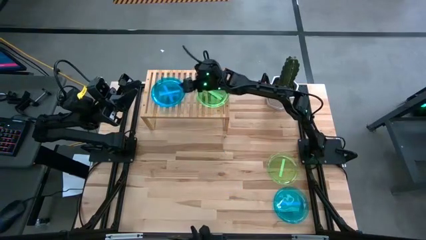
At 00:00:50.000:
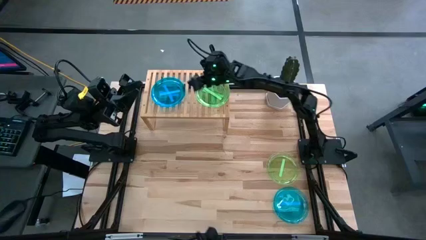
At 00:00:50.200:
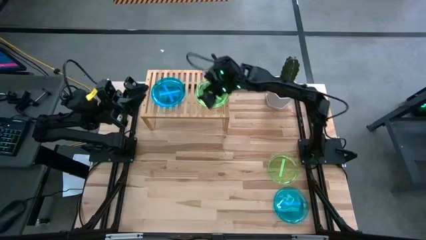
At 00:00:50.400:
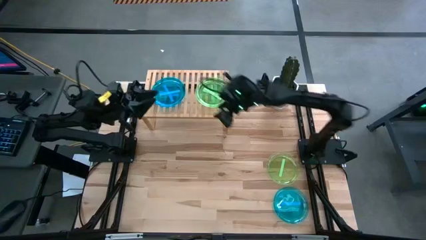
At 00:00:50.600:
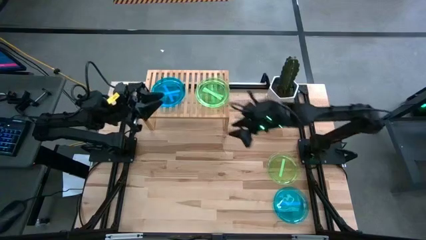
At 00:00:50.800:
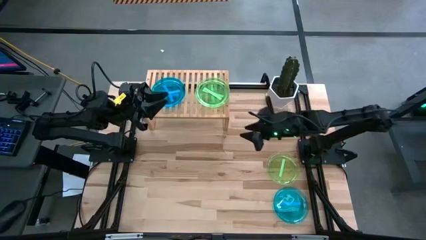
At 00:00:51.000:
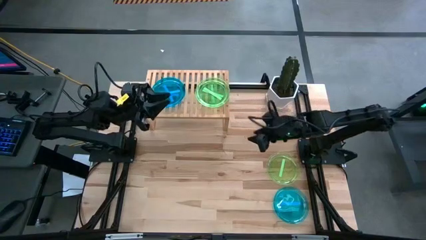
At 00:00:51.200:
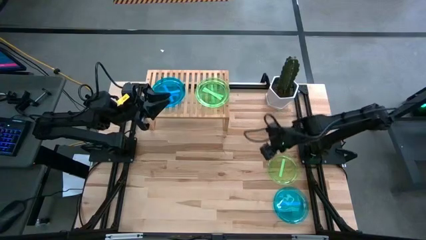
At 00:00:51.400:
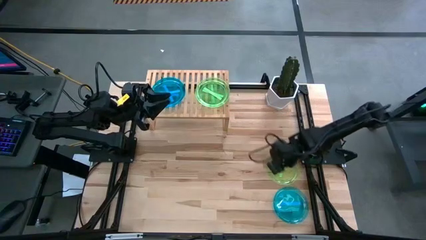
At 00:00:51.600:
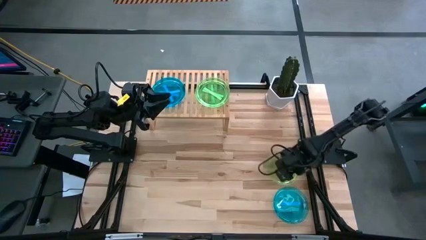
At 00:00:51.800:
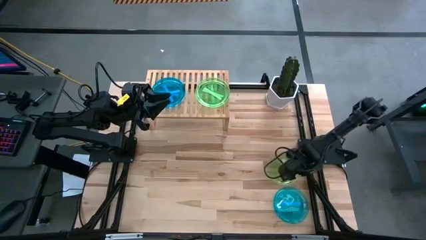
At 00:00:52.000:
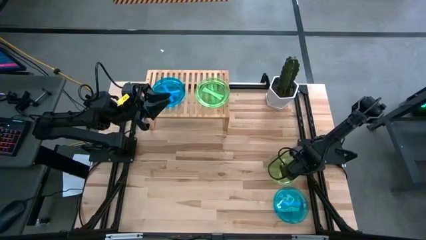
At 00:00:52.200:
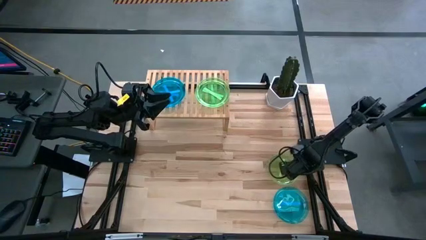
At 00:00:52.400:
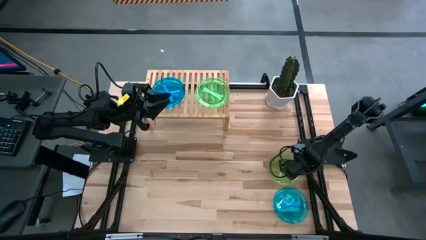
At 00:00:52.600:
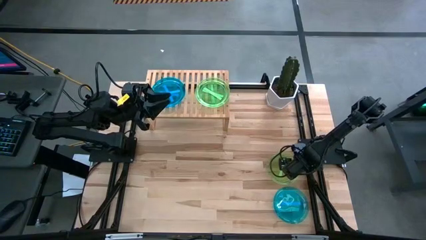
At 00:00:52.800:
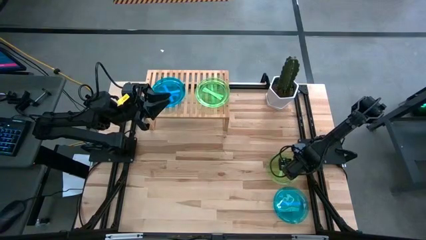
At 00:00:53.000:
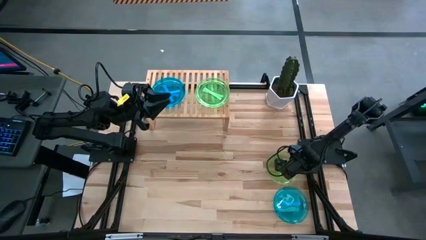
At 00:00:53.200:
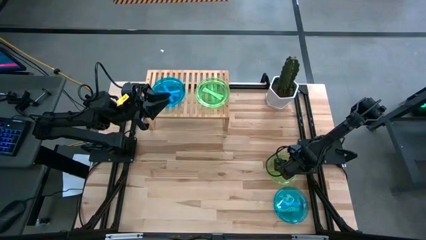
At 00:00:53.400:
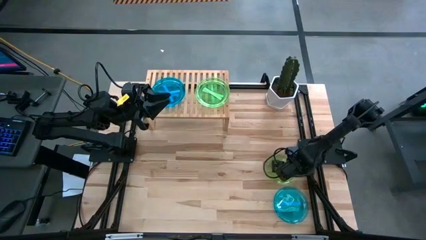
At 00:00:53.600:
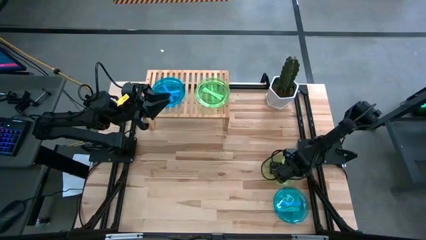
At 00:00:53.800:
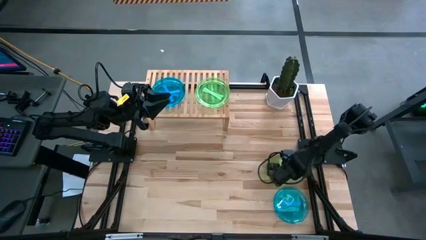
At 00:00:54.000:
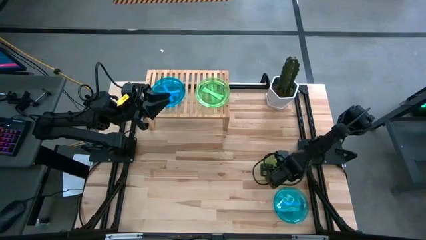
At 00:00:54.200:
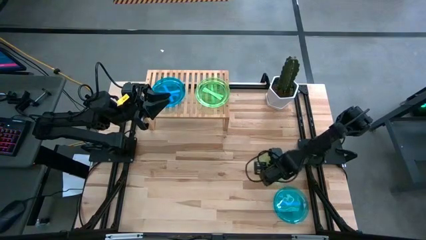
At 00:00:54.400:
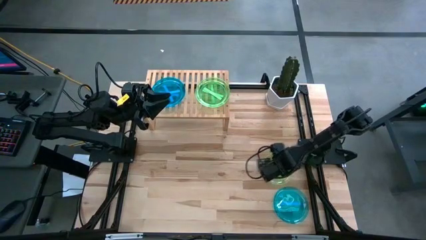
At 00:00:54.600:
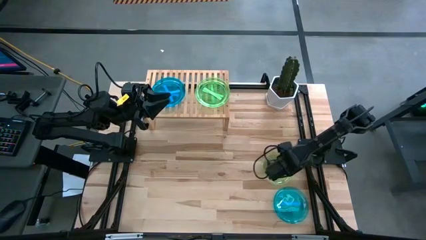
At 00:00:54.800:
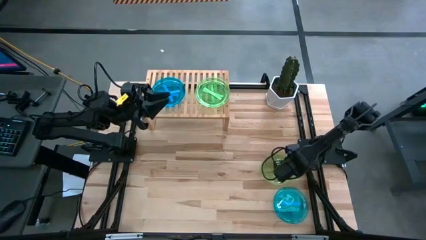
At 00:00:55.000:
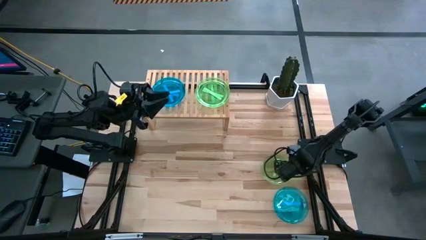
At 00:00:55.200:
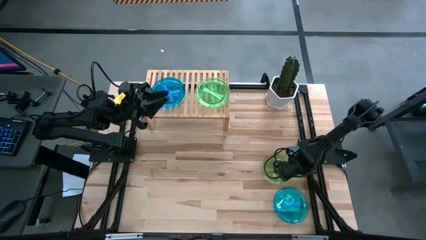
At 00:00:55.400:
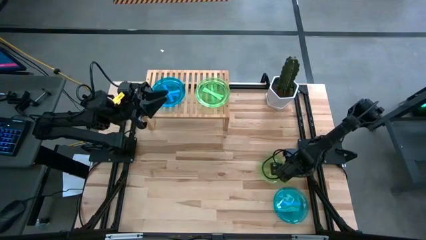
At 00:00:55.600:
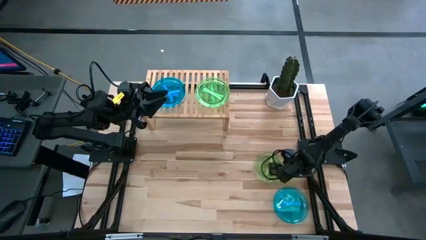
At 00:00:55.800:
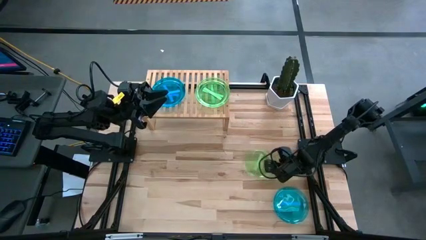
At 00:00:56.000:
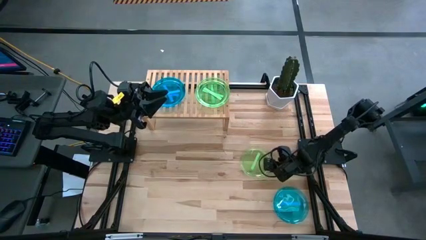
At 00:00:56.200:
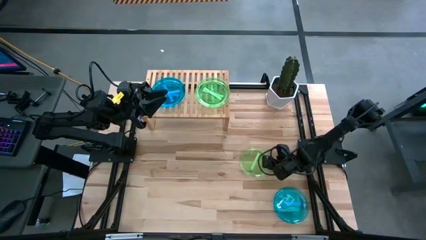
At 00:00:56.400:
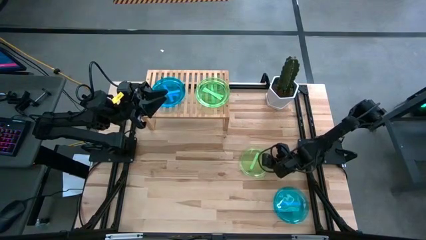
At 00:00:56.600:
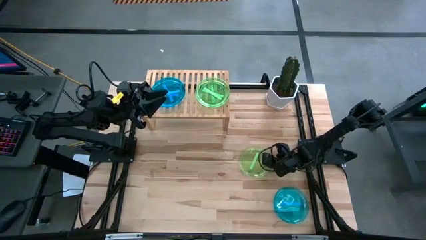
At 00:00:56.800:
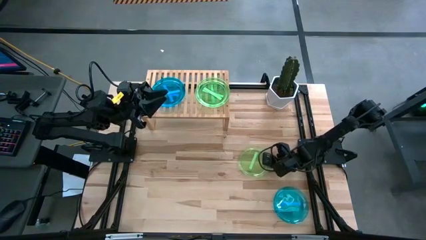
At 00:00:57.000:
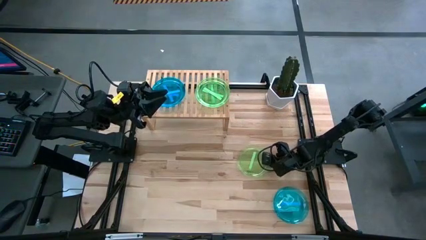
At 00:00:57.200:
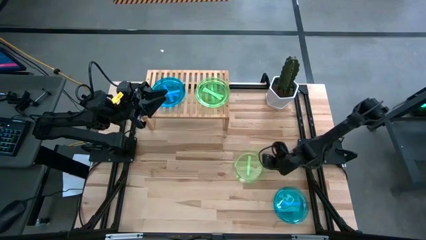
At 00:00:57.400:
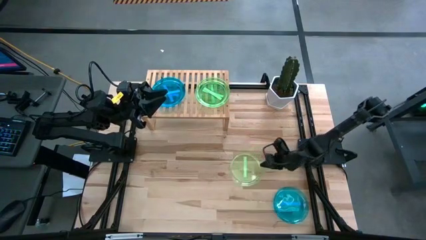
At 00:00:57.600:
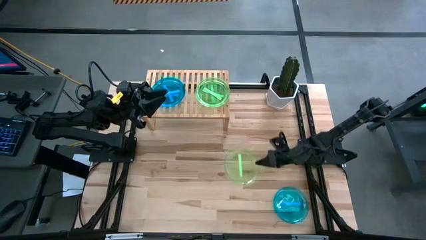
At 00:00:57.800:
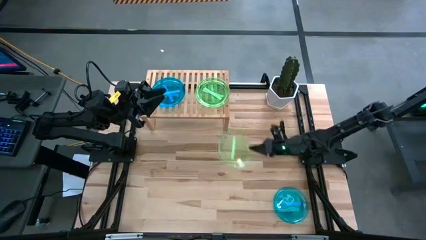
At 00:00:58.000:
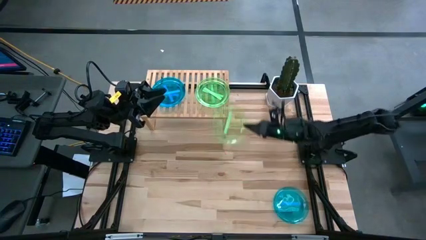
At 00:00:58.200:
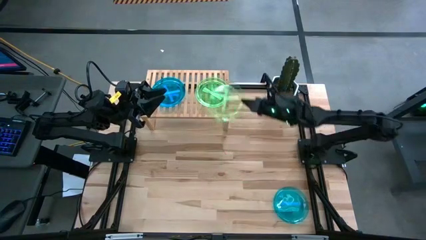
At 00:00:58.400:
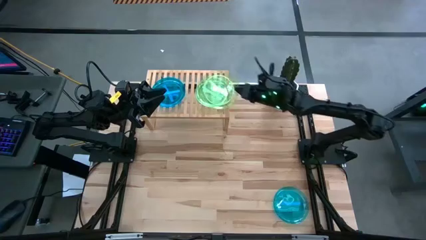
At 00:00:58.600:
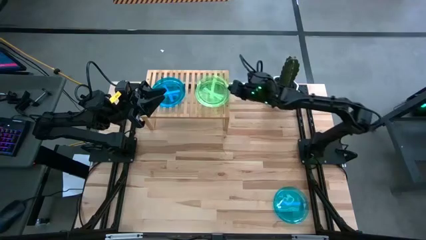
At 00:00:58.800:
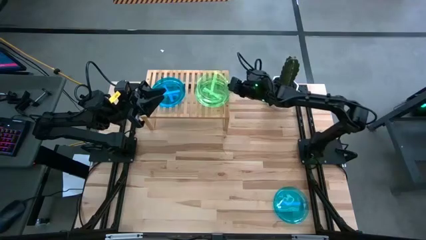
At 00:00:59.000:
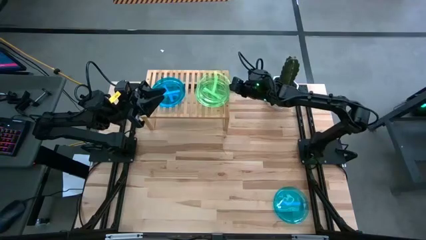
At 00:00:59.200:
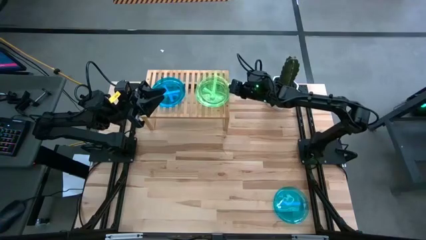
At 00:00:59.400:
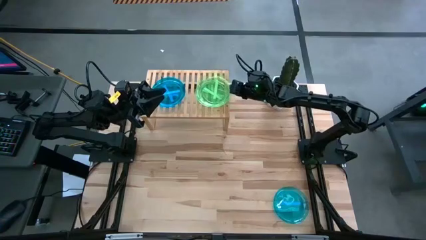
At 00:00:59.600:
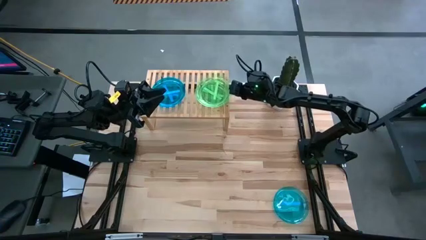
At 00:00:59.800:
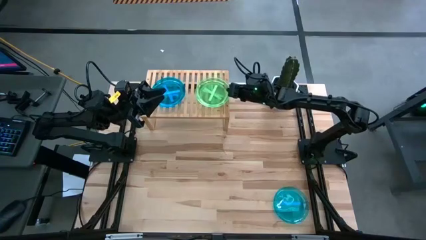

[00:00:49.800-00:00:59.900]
Task: Place and stack plates onto a shelf
Stack the green plate on top of the green plate on the shelf

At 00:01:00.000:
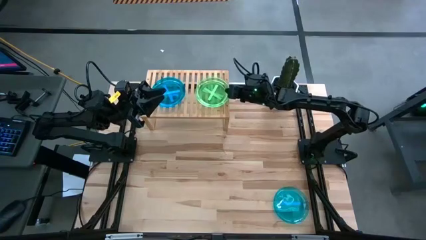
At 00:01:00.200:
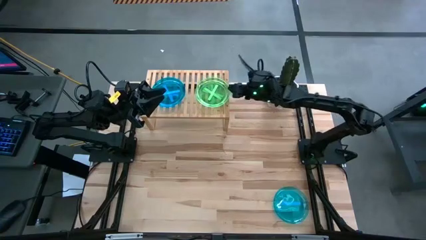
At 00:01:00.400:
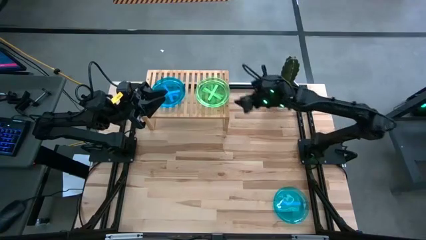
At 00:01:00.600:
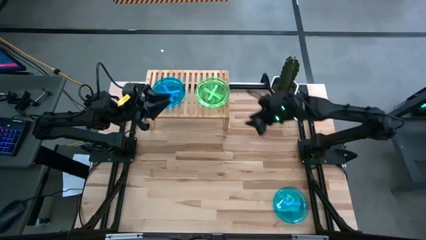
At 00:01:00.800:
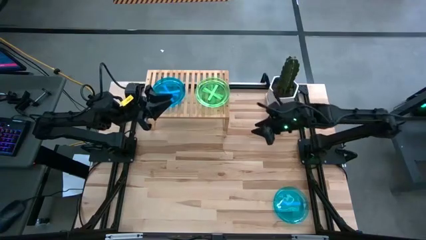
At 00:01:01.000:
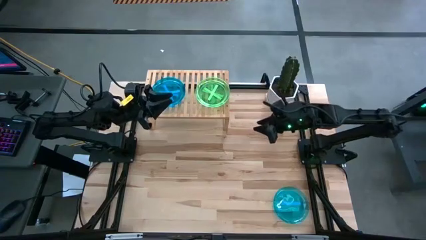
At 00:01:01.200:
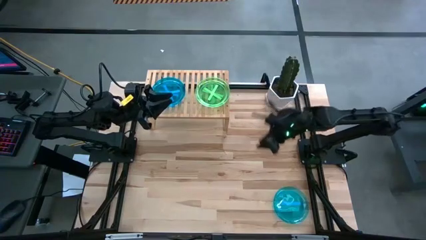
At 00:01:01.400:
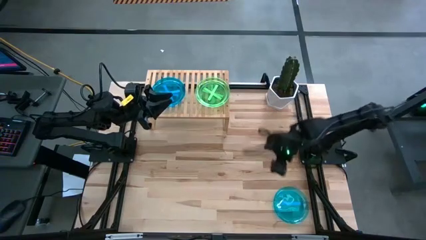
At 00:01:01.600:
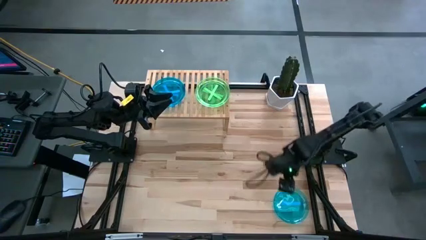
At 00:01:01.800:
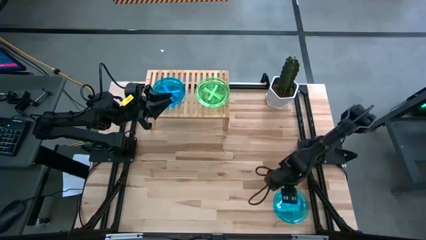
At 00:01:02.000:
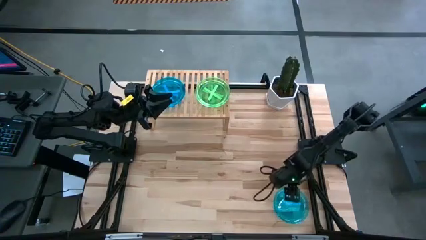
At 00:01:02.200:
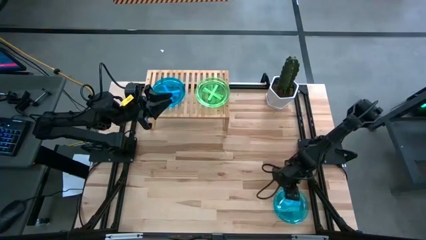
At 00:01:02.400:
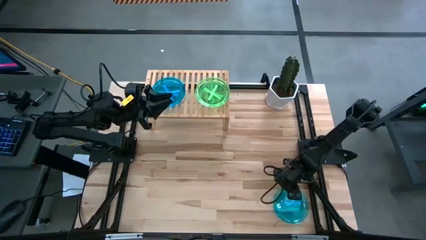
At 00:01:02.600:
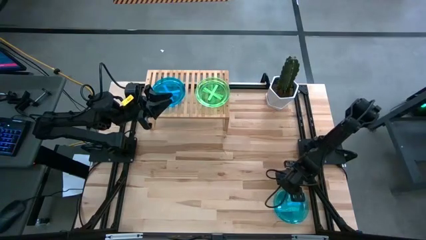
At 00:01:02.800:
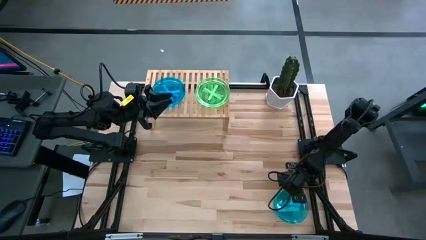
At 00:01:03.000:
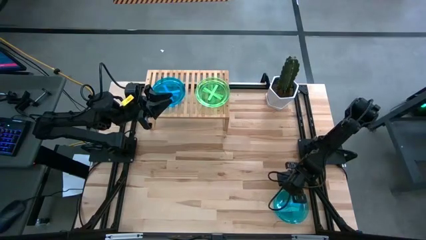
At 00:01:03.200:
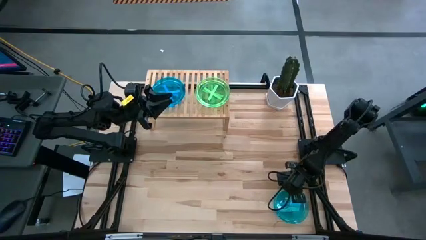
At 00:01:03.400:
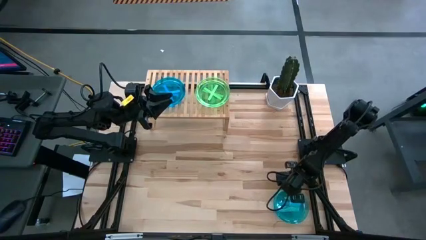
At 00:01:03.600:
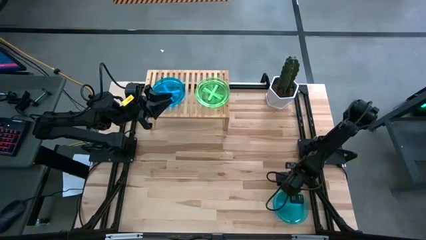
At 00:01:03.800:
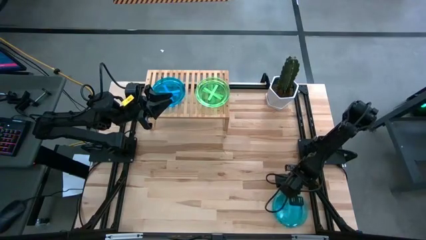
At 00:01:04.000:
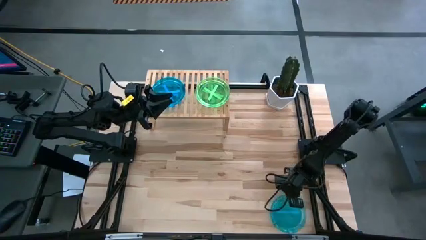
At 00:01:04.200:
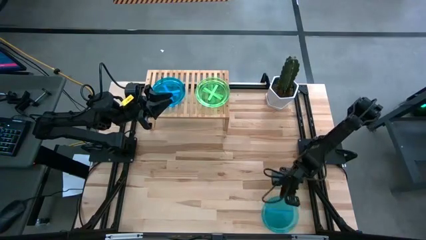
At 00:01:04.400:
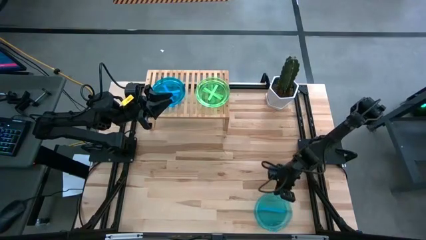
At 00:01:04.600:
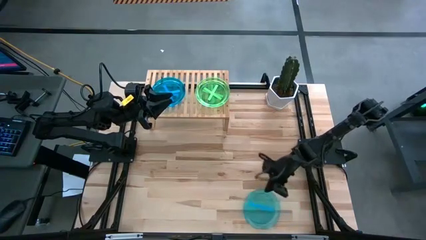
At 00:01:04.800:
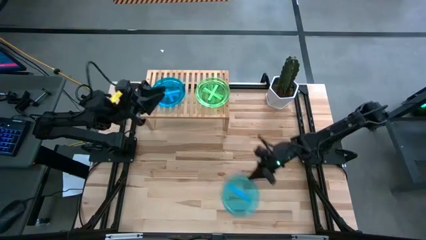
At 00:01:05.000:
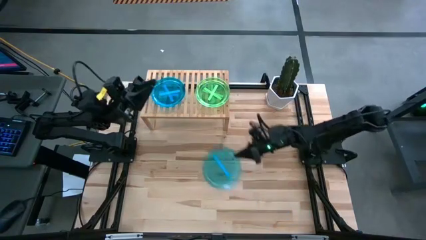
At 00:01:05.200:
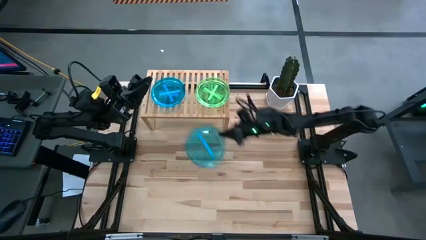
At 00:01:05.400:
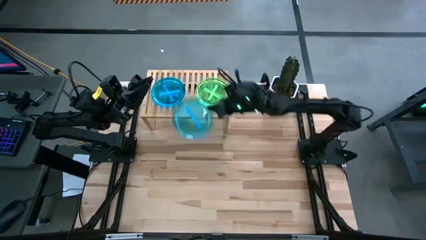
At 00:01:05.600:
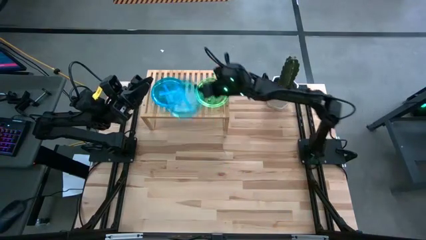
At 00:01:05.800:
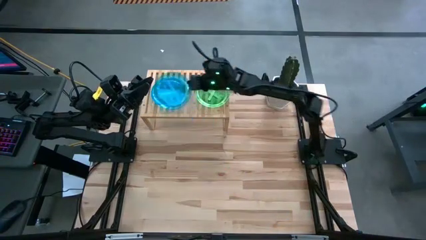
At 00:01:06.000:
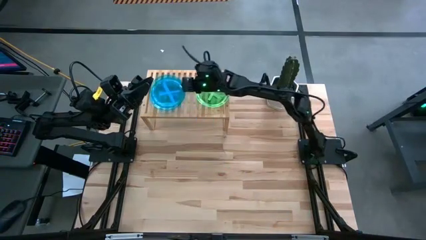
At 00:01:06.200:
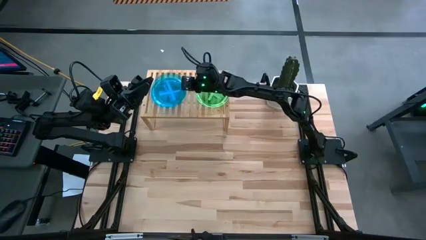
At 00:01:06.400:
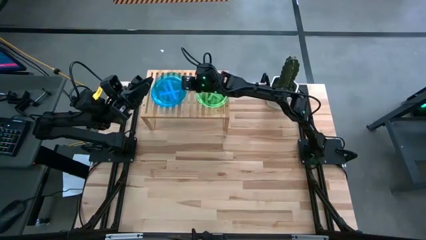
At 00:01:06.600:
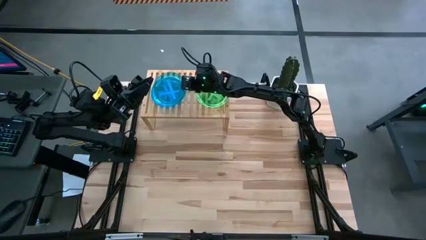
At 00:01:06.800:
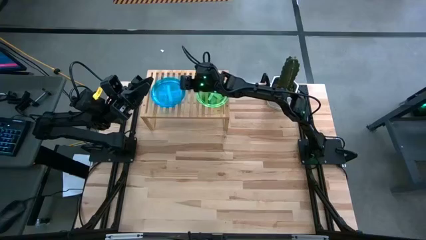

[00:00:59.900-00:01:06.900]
Stack the blue plate on top of the blue plate on the shelf
